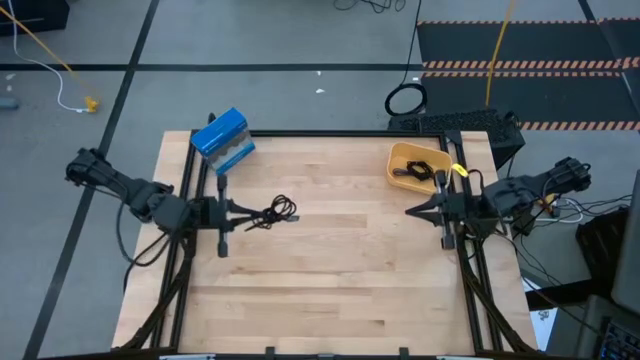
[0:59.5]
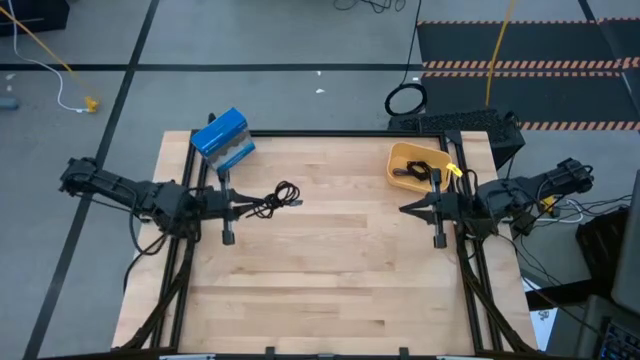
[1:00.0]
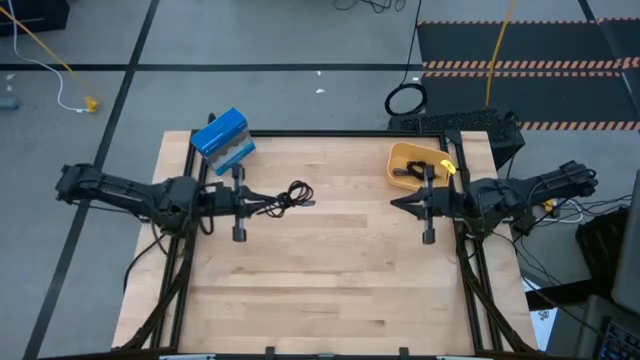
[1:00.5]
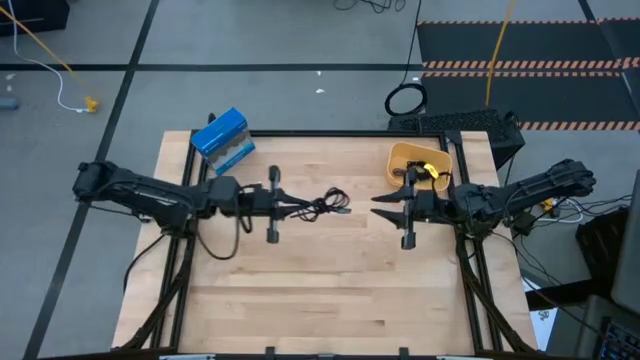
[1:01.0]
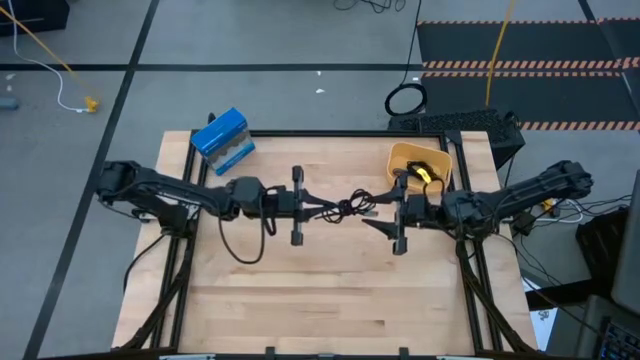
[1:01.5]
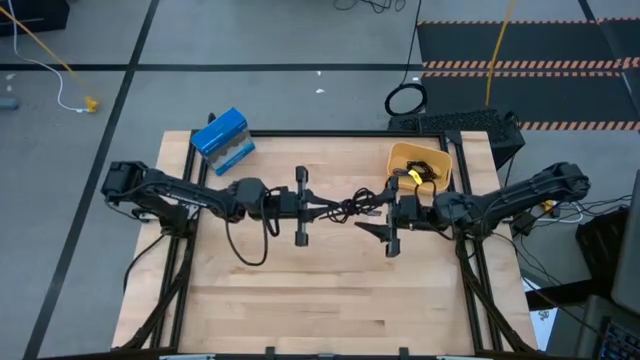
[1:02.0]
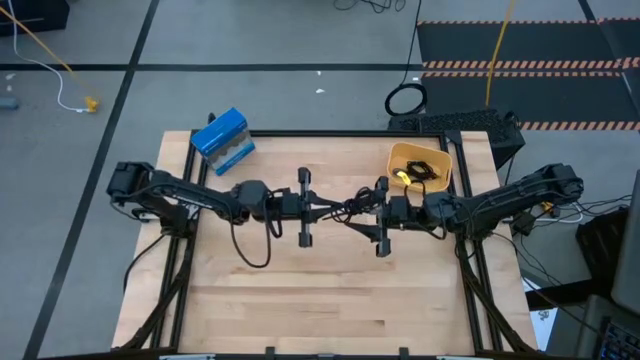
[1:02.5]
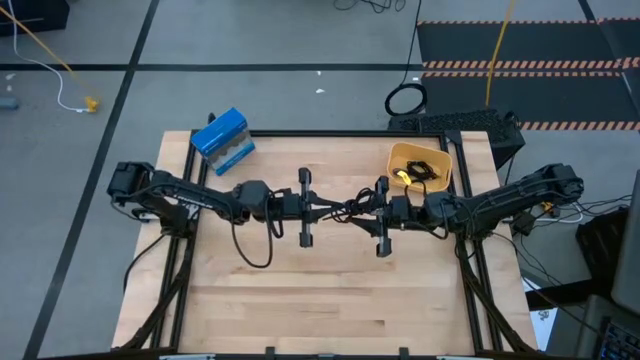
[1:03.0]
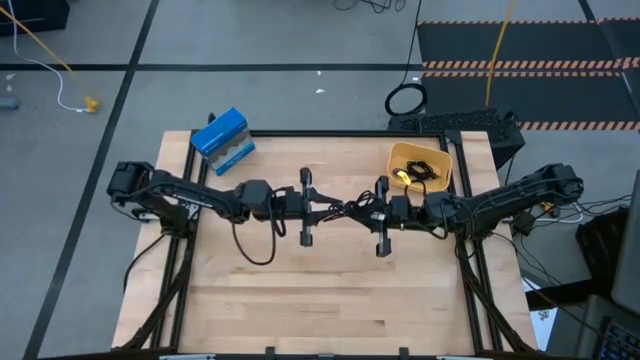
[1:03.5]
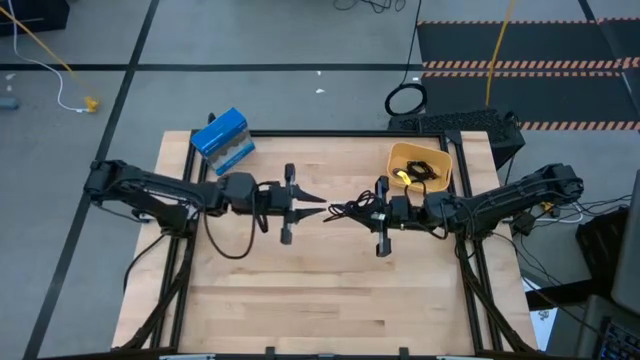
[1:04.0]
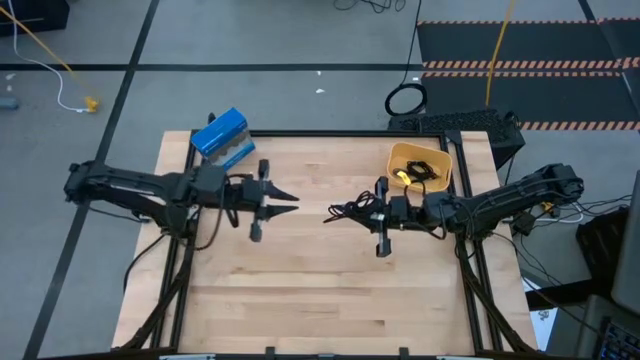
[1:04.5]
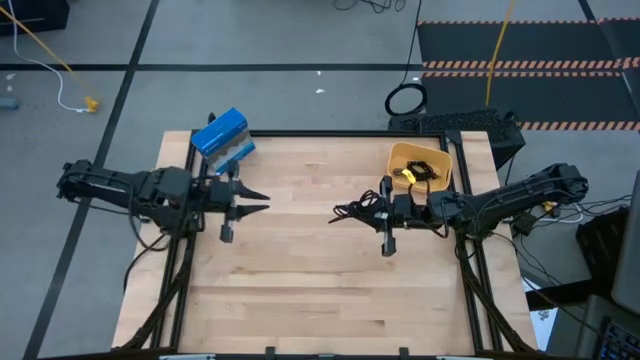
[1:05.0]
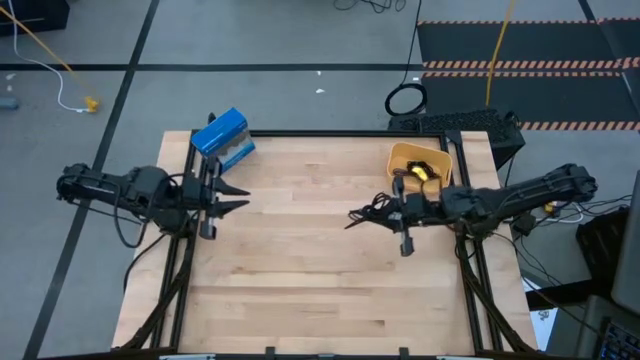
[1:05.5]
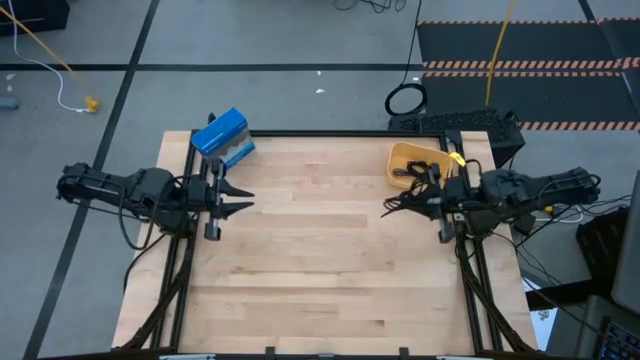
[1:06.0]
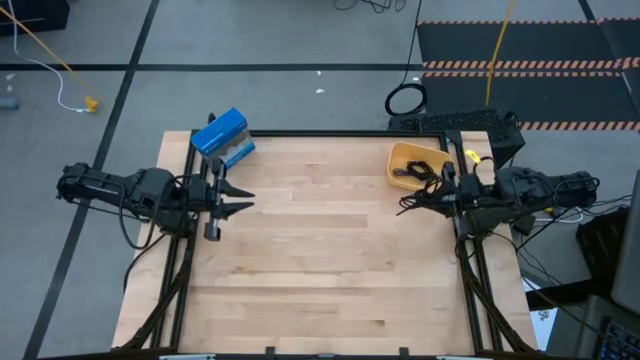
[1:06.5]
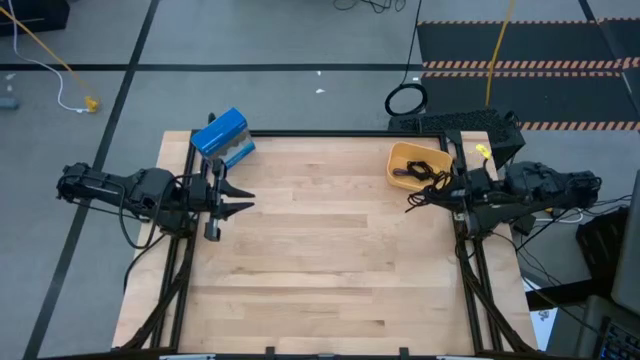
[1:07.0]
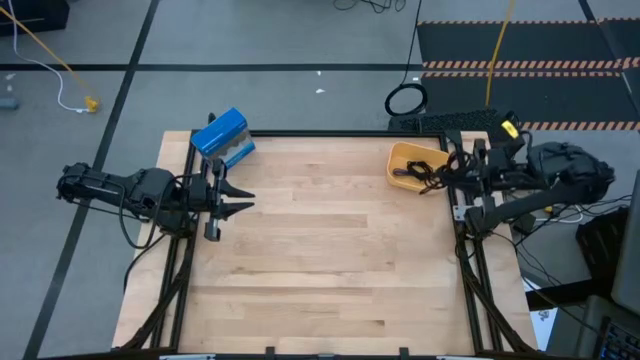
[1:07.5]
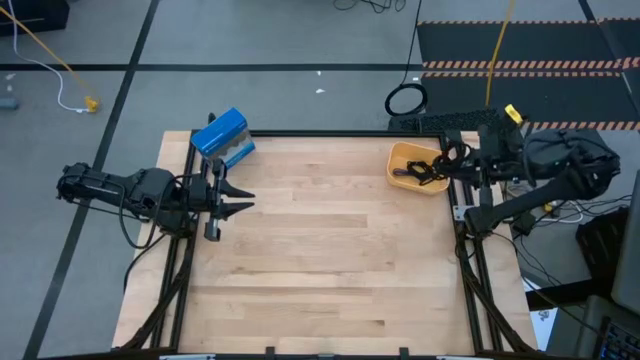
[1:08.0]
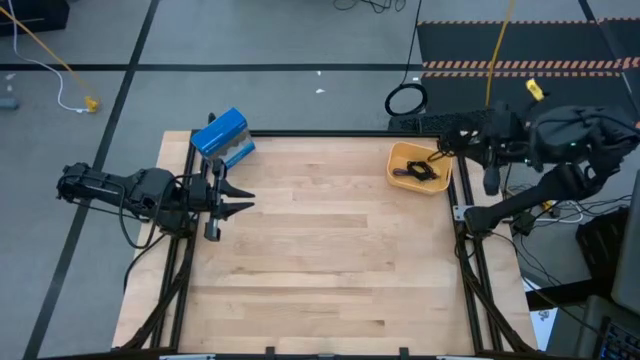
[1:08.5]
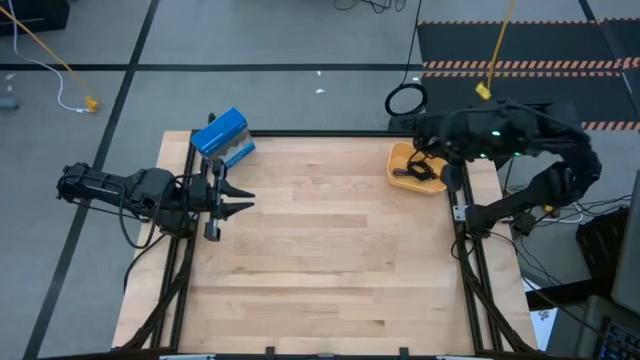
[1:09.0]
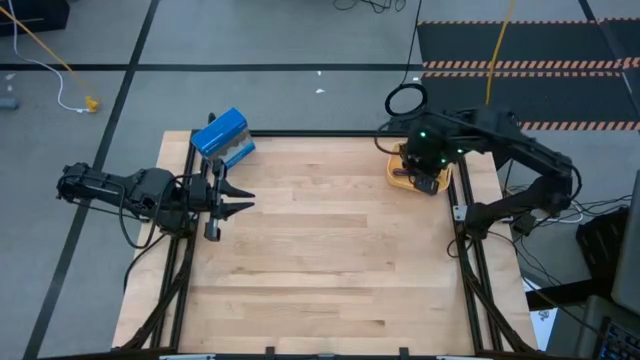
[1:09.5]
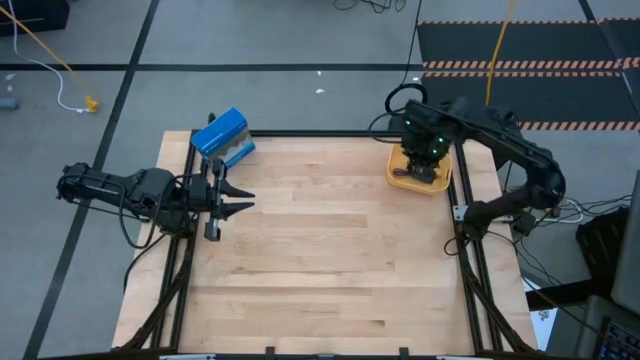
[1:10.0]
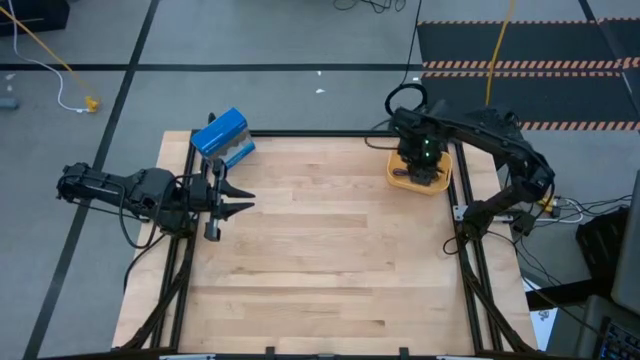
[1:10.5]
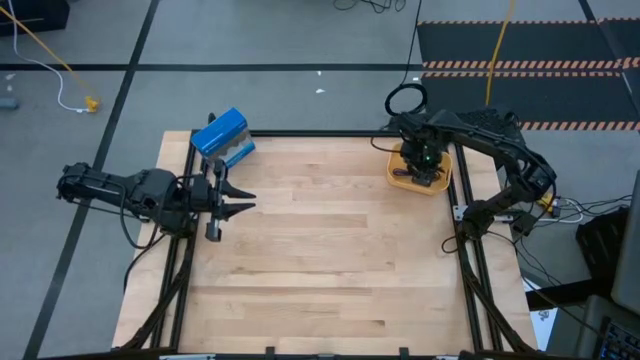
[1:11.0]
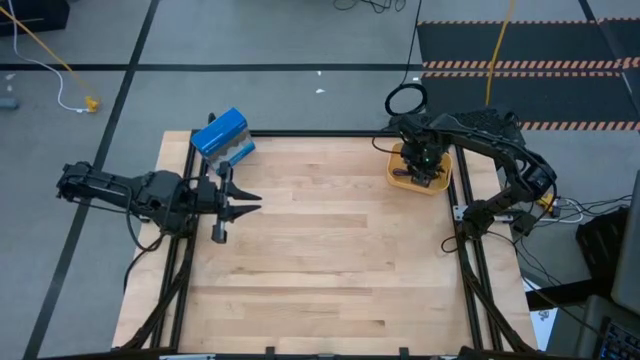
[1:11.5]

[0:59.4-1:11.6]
Task: Pick and place USB-C Cables
Put the charger cable into the yellow bin

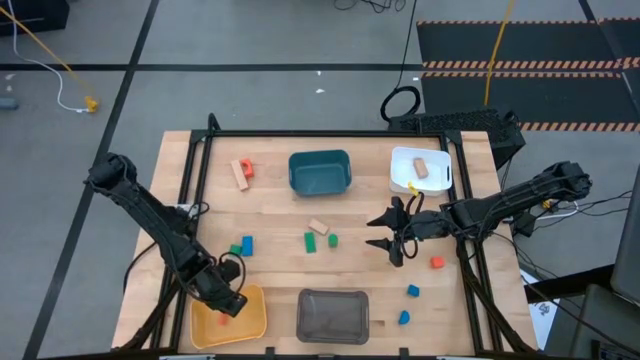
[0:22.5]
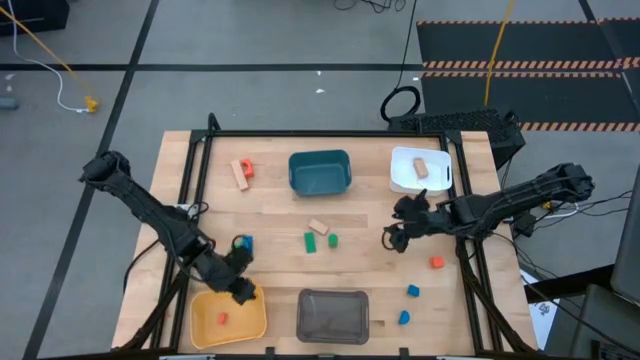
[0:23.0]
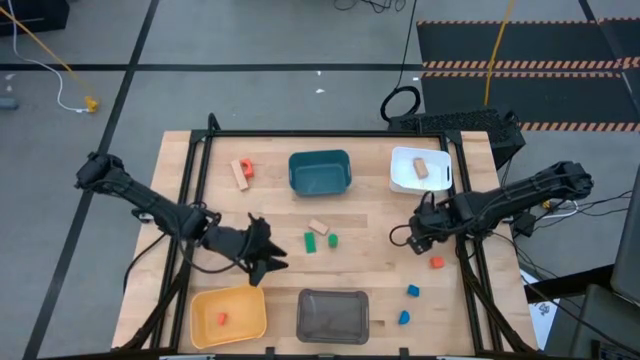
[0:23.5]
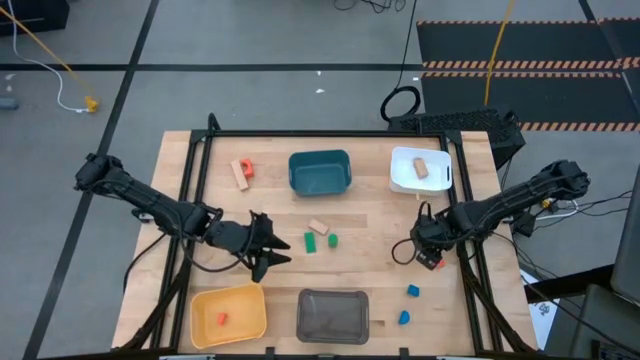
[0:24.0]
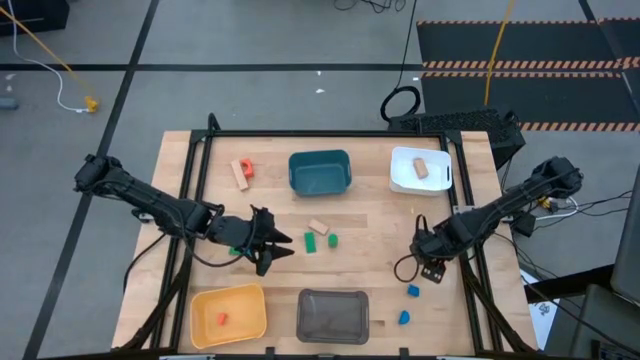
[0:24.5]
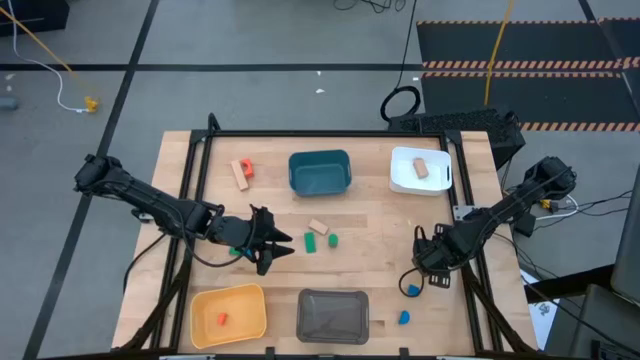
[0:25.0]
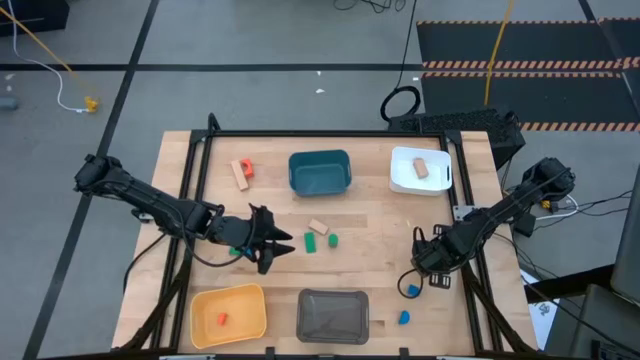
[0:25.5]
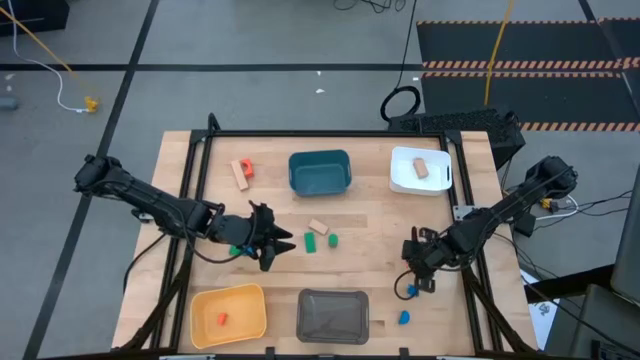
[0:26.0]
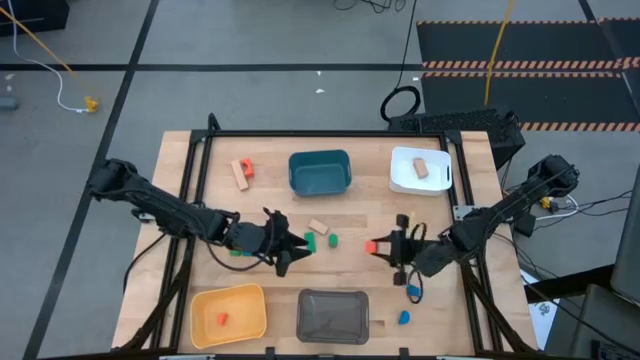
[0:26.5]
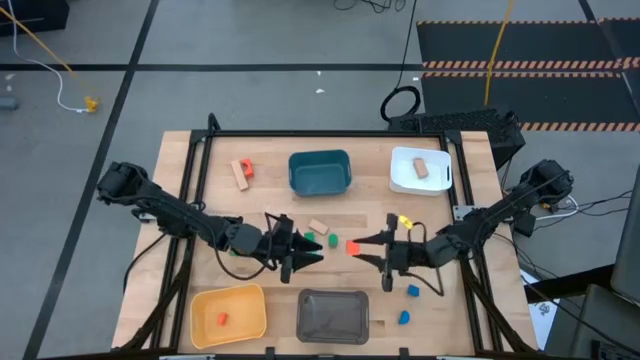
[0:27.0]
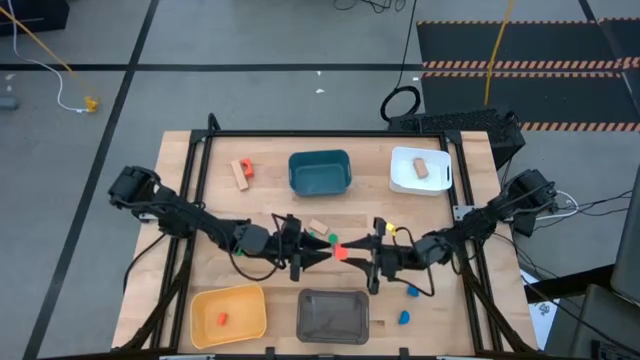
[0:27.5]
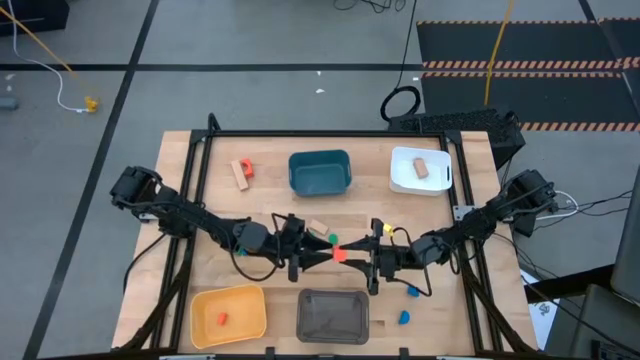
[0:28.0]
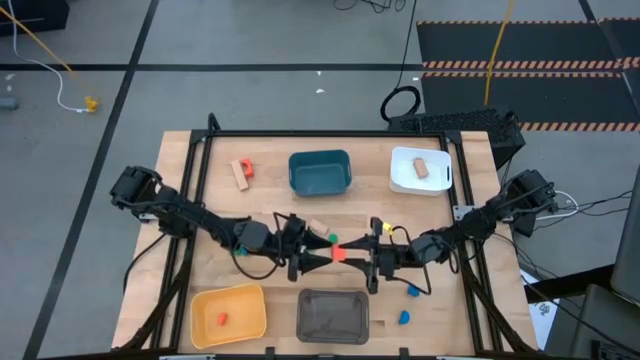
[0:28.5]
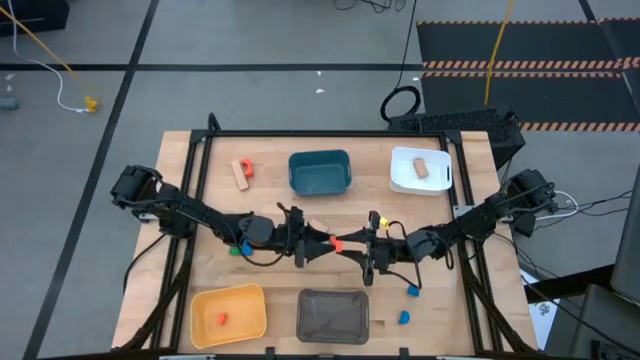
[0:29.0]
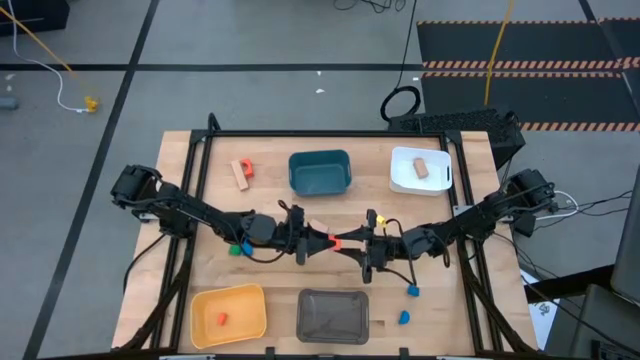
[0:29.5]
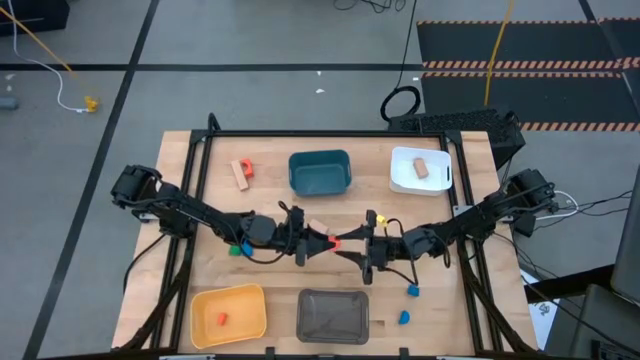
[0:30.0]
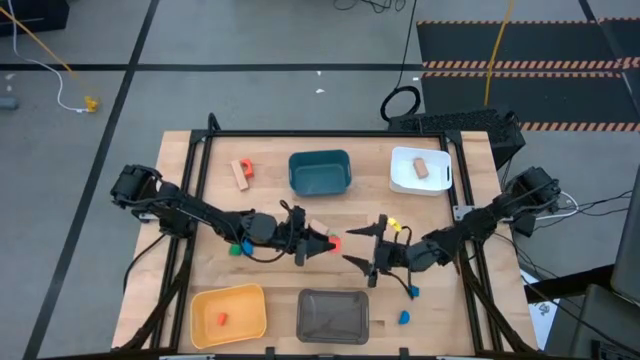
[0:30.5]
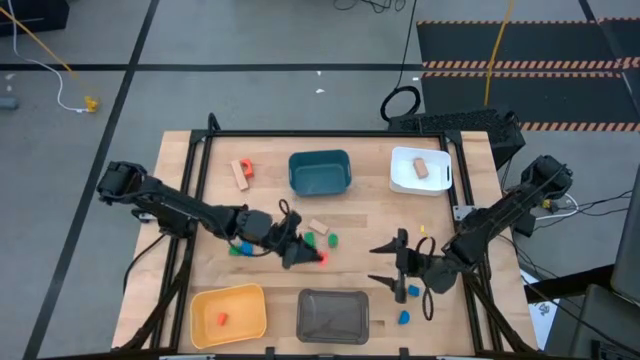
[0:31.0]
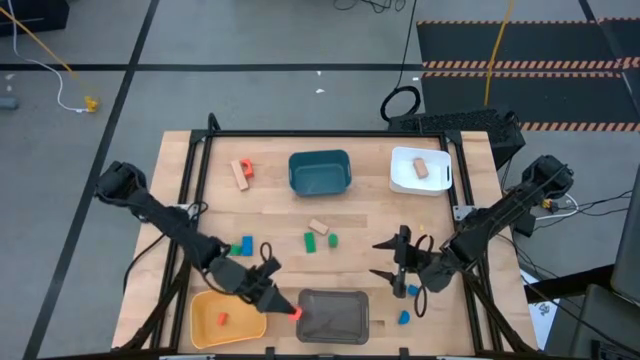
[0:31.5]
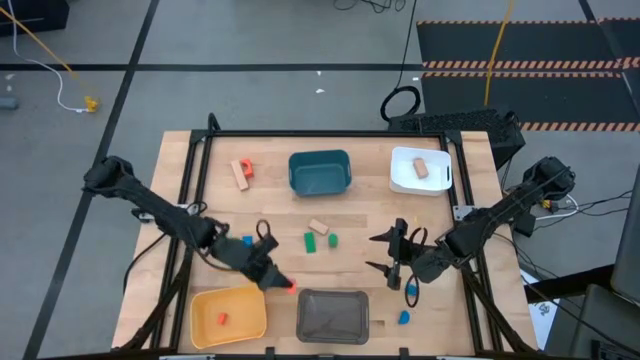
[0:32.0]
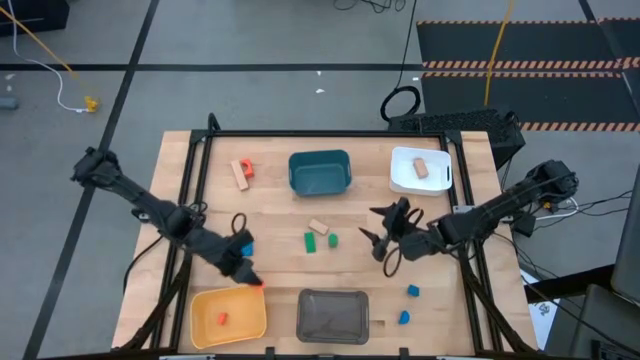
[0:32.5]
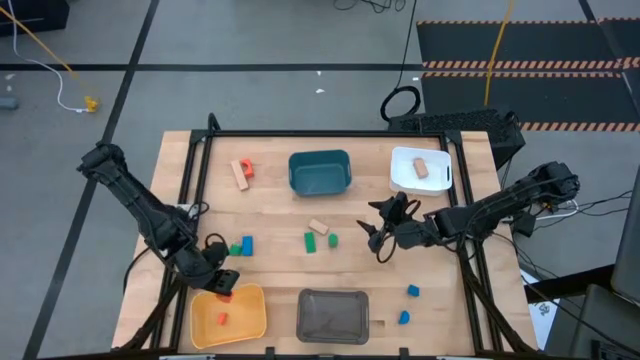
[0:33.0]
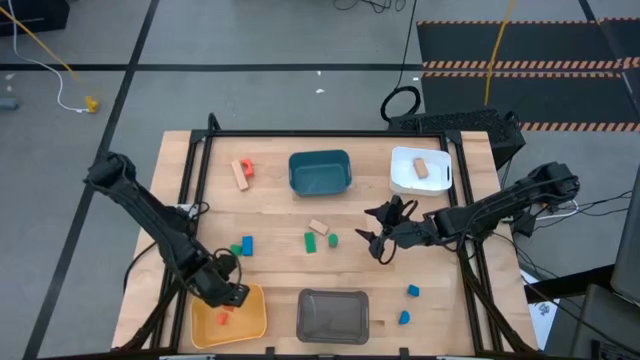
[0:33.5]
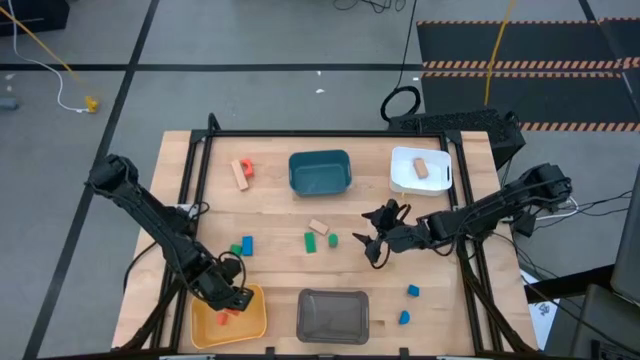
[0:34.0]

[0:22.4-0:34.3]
Task: Sort & place blocks by color
Put the bottom orange block into the yellow bin
